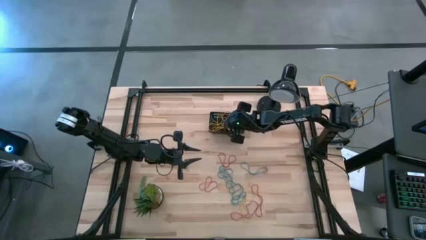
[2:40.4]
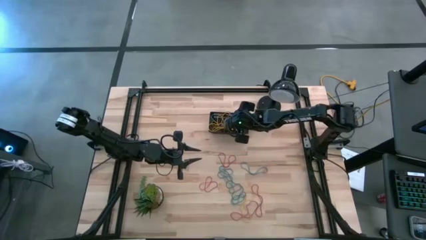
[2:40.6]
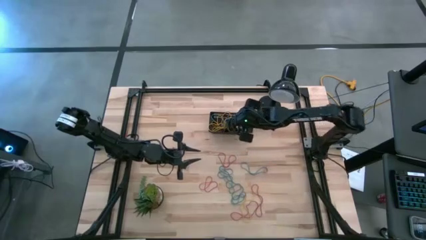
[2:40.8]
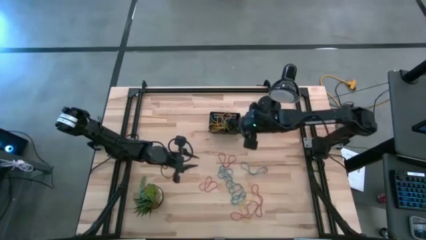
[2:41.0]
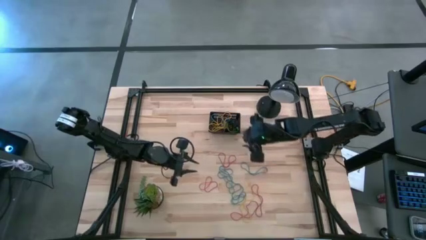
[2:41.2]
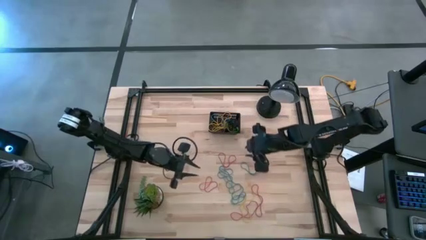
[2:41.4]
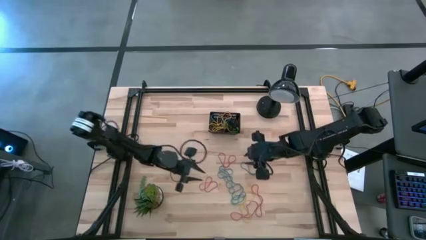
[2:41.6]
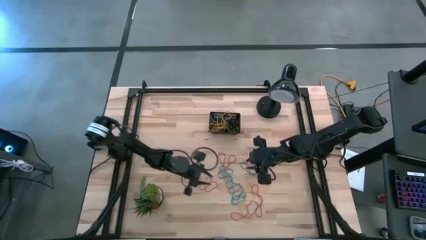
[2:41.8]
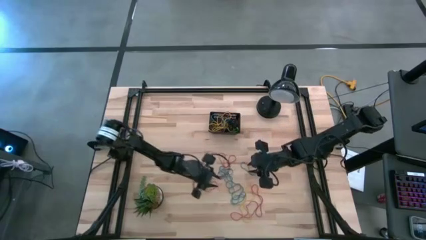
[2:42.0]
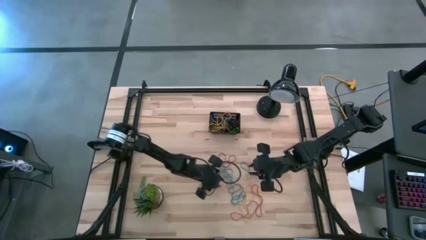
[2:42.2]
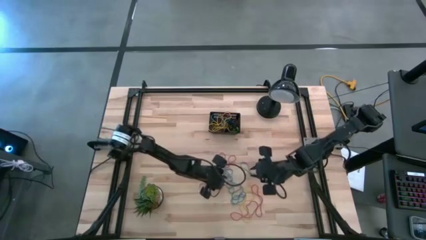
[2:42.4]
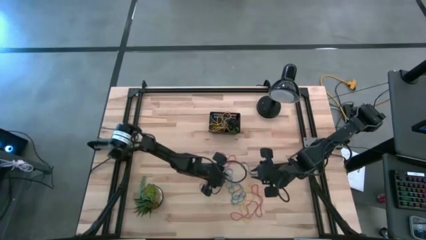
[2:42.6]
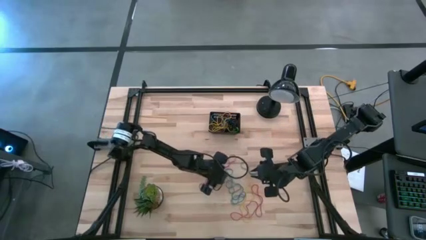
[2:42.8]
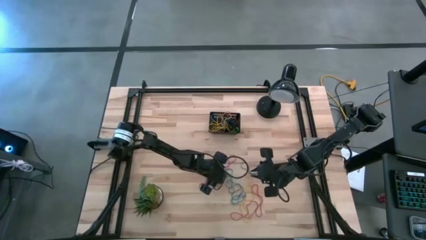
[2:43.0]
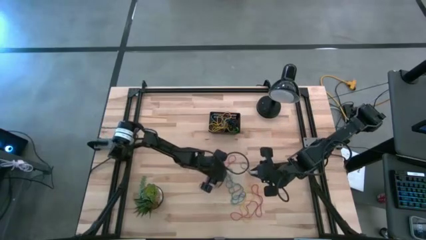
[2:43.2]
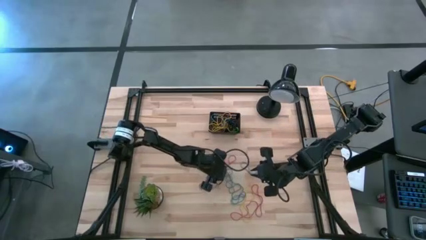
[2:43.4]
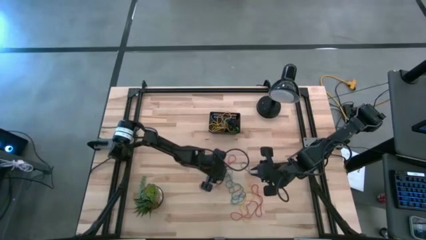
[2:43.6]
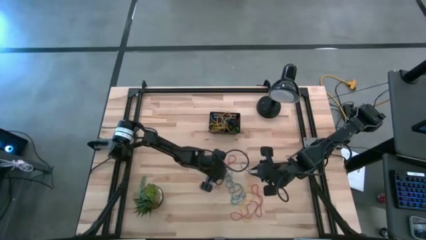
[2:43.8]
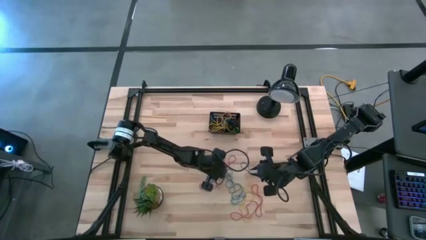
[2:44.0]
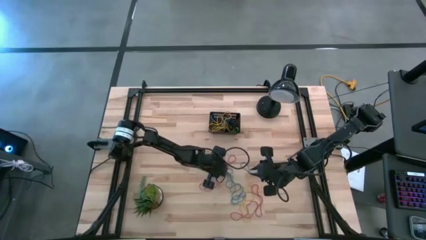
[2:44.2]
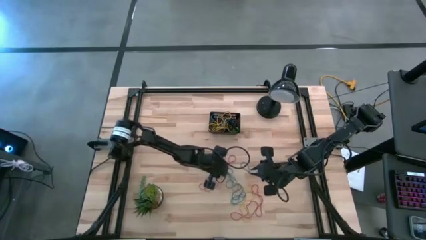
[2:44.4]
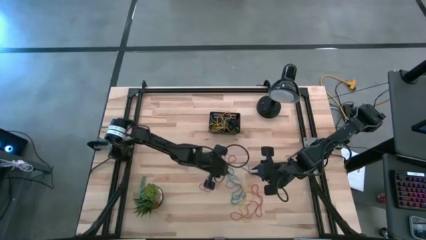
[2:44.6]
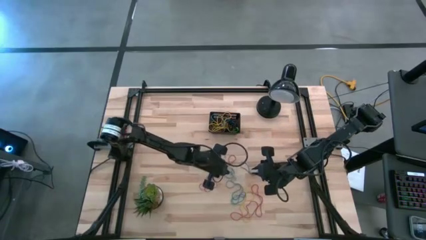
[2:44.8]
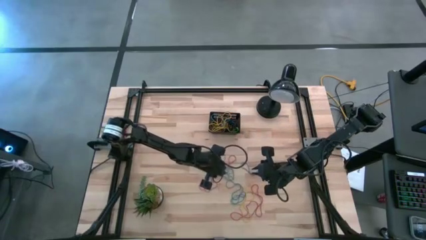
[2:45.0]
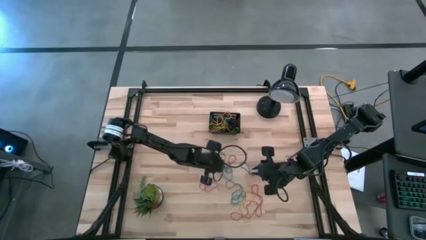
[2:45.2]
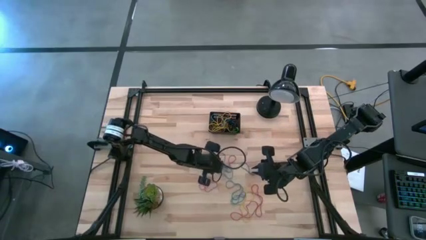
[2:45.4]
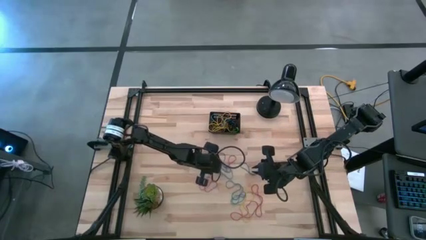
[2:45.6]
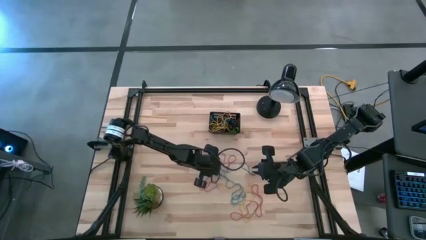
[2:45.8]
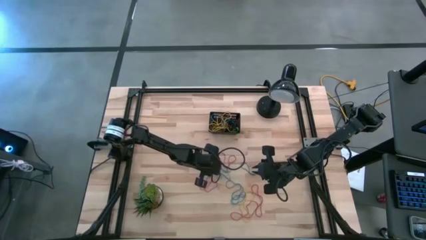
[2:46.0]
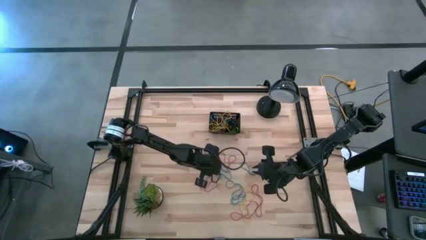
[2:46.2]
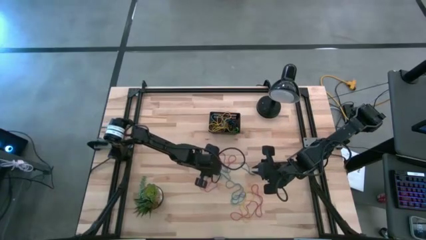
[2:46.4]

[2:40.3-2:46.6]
Task: Pick and place rubber bands into bin
Put the blue rubber band into the basket

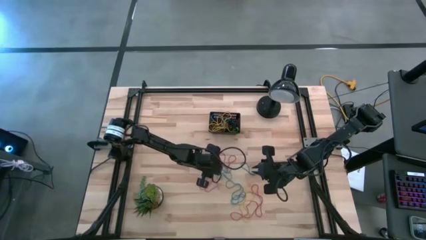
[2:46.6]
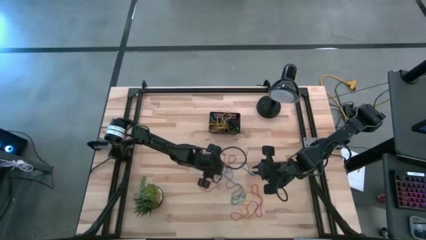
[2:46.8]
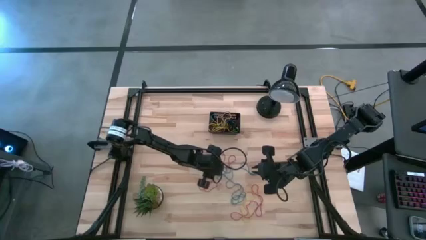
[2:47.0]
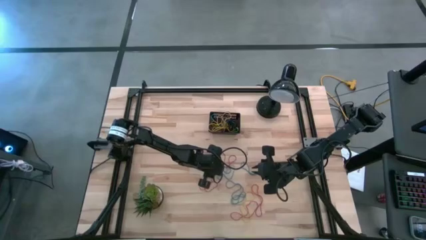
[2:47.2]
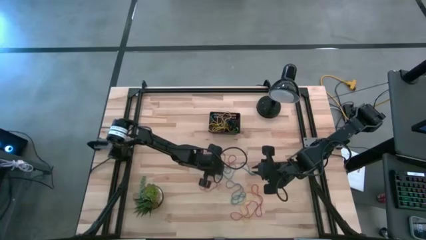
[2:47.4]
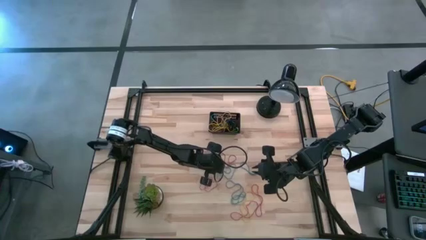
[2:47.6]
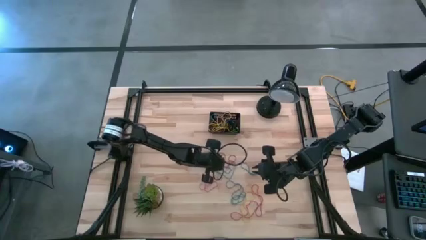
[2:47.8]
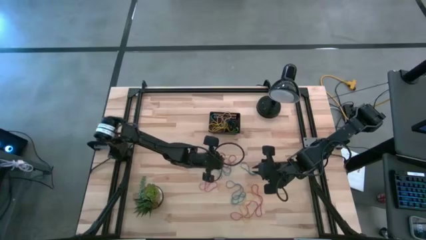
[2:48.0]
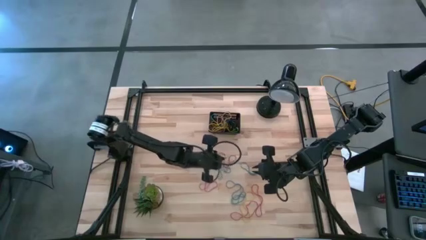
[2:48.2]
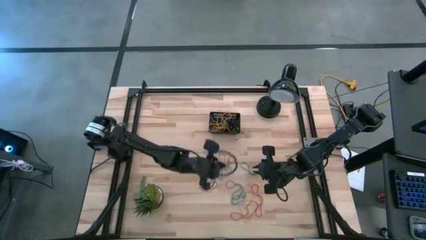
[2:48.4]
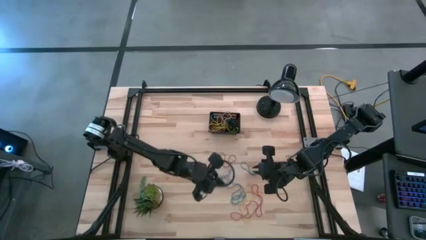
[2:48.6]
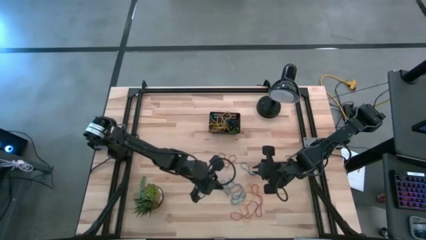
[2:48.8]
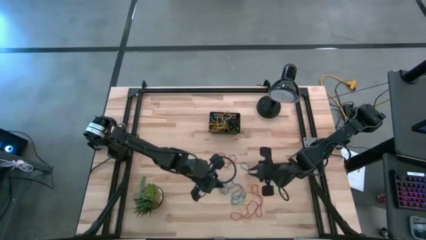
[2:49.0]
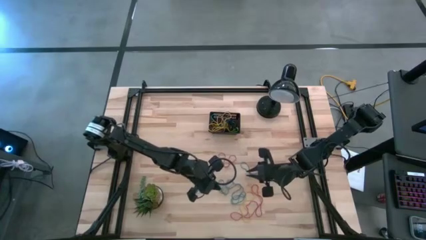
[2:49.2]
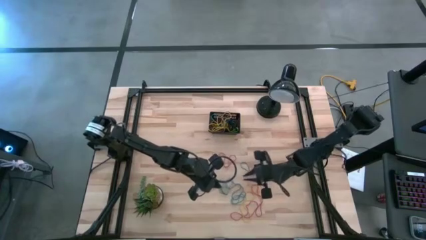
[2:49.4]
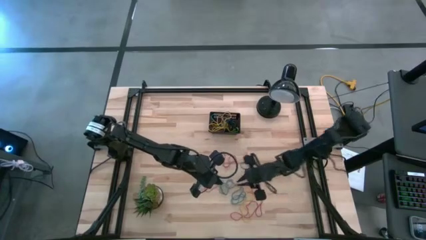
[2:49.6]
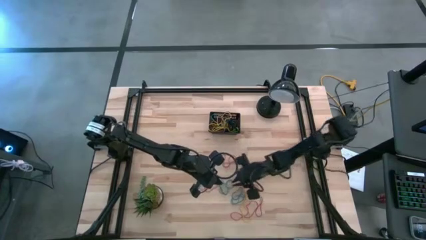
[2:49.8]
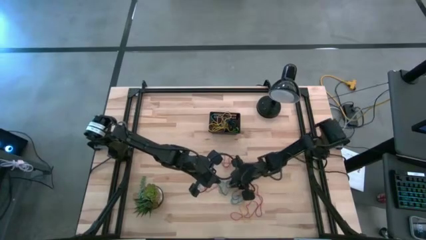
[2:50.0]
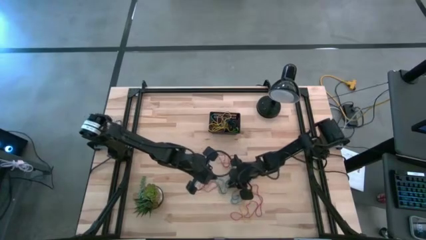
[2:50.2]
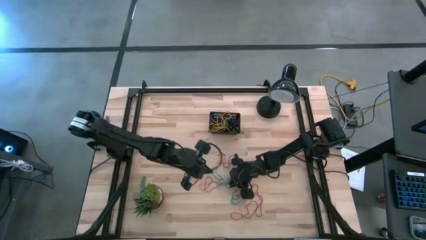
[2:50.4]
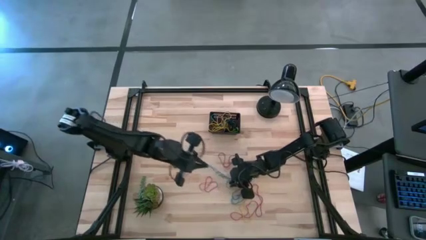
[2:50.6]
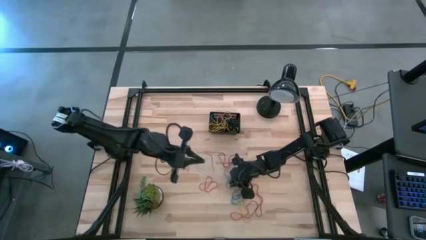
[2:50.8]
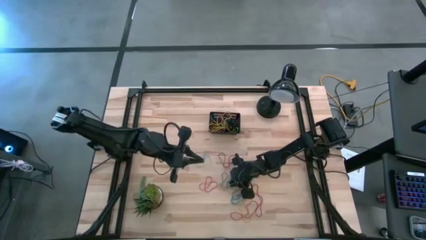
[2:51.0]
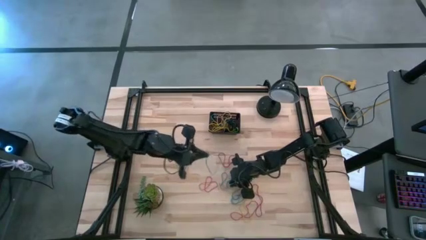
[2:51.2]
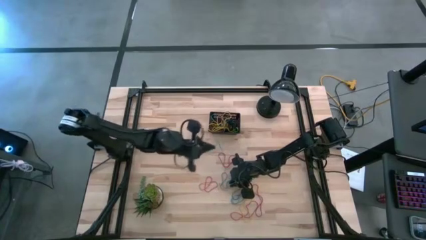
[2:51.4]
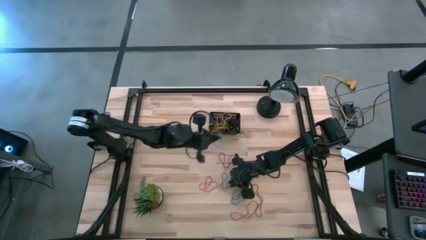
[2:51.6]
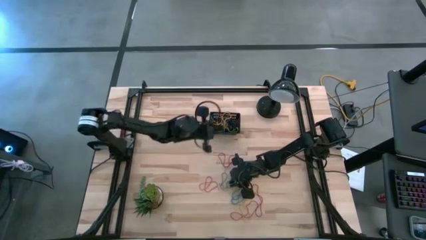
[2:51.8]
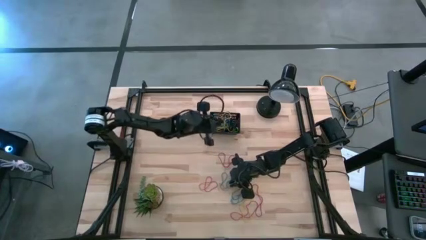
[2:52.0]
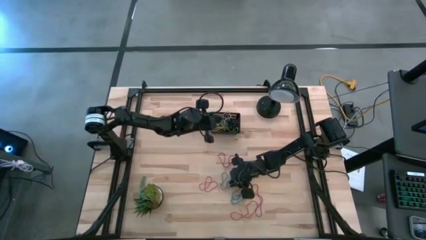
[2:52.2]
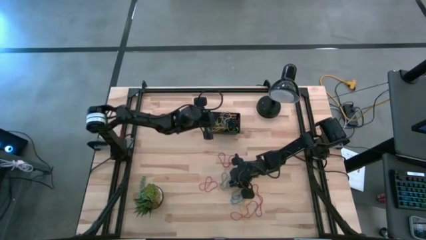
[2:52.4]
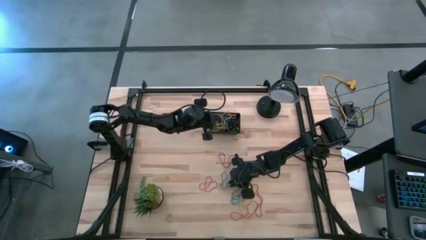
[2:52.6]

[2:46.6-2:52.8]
Put the blue rubber band into the basket

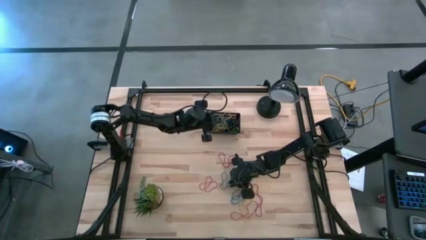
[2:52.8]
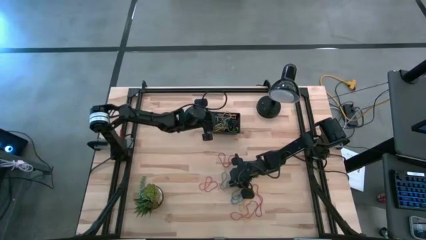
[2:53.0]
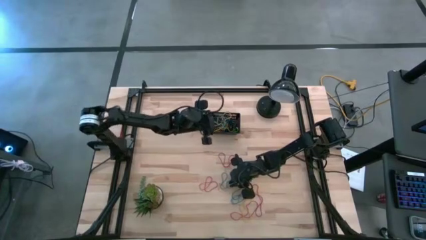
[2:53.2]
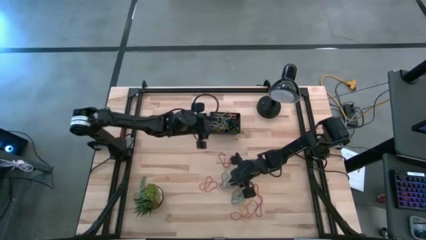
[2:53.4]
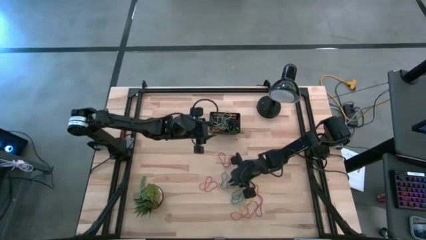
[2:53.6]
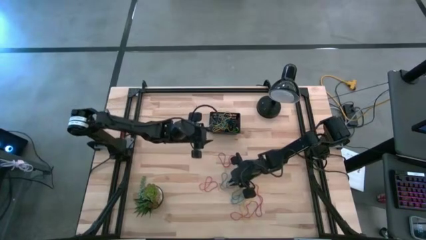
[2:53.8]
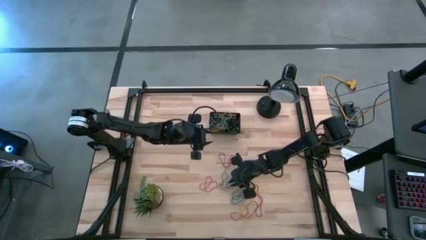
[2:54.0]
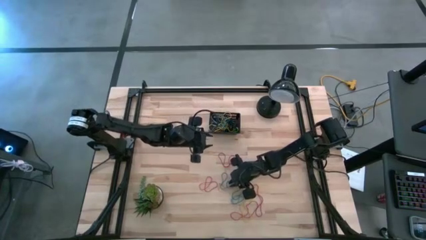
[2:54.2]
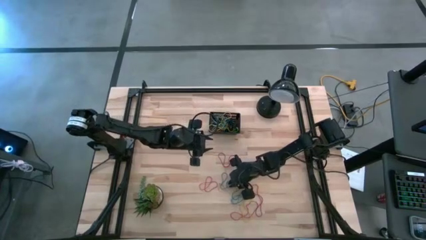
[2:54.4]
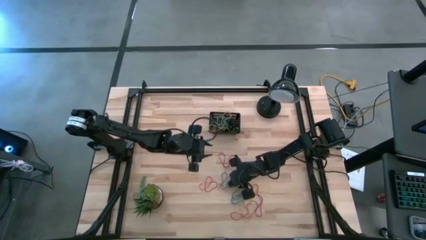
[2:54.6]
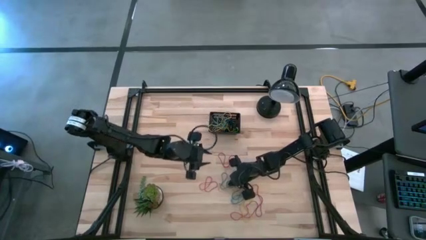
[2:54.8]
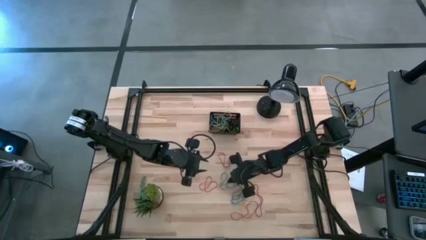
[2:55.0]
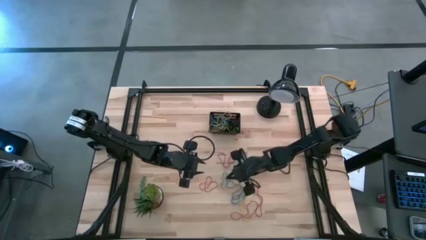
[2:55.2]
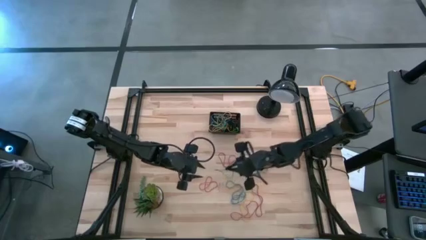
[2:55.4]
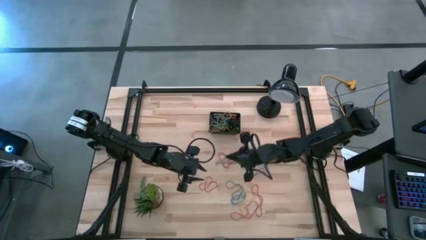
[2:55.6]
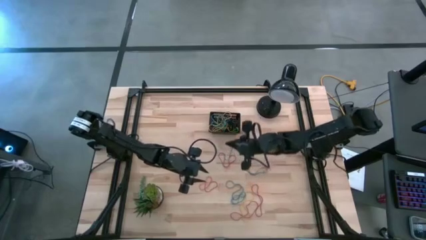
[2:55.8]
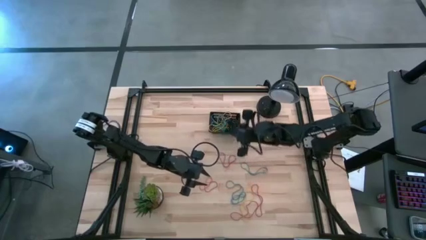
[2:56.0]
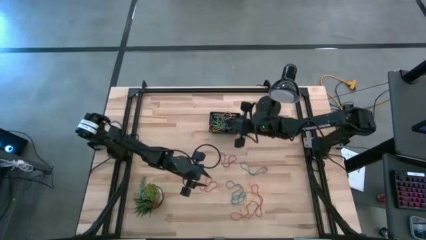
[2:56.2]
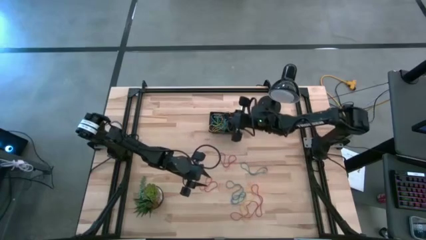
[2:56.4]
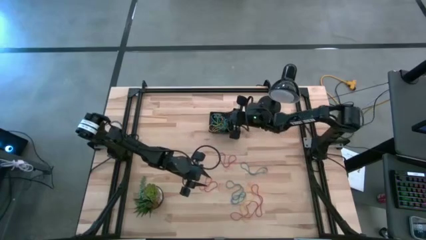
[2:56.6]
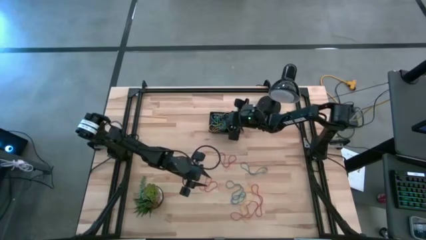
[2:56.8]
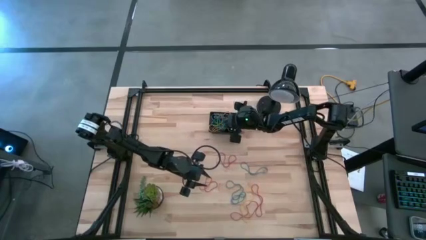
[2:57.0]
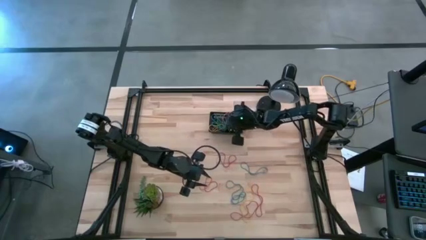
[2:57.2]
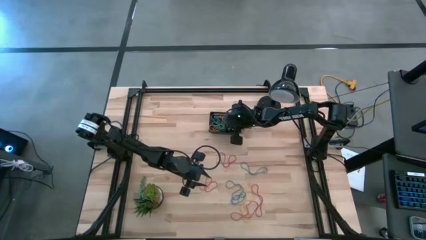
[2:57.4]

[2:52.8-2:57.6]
Put the blue rubber band into the basket
